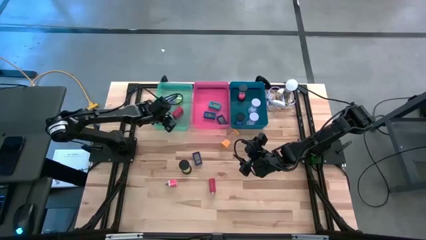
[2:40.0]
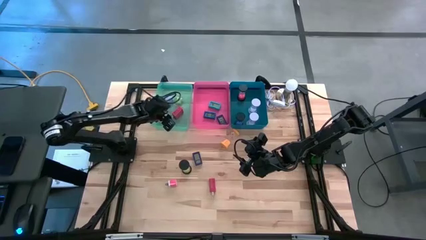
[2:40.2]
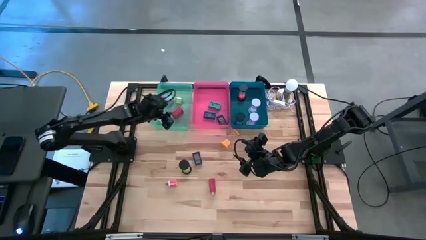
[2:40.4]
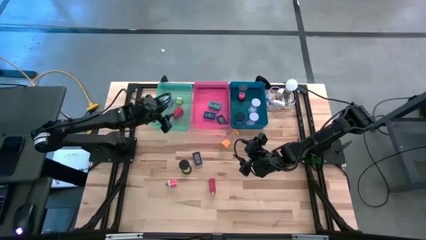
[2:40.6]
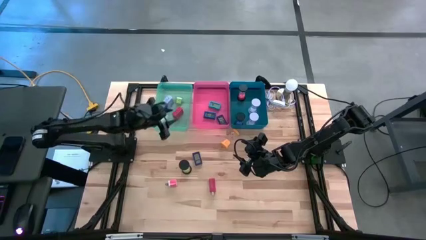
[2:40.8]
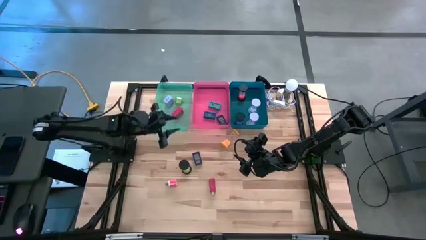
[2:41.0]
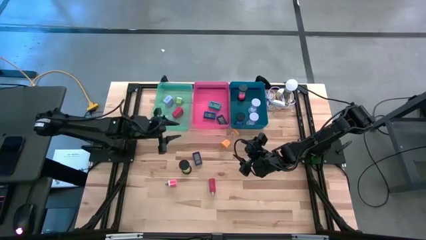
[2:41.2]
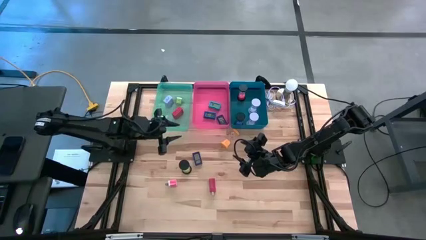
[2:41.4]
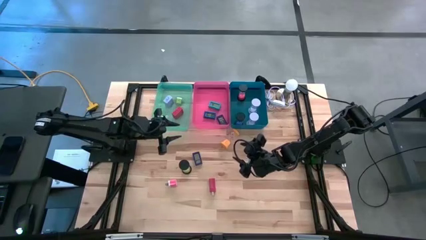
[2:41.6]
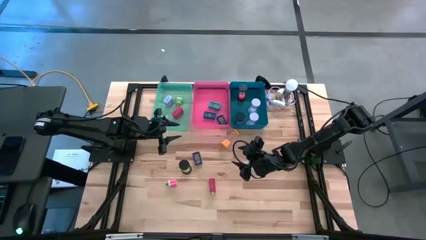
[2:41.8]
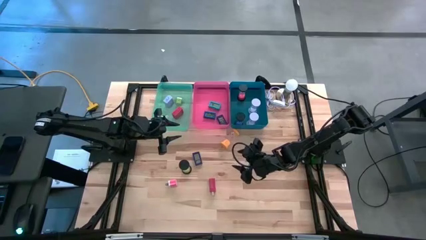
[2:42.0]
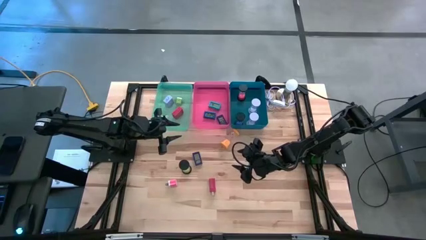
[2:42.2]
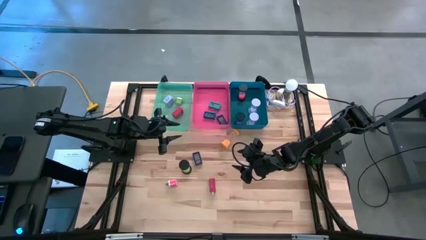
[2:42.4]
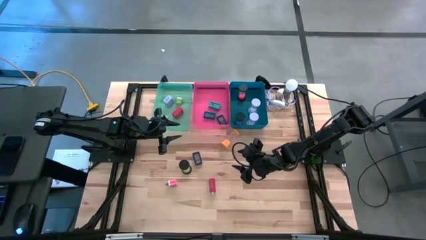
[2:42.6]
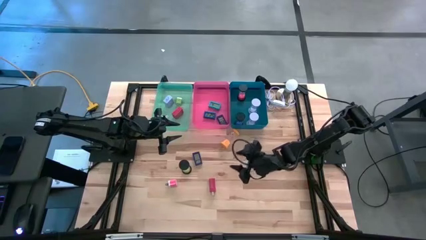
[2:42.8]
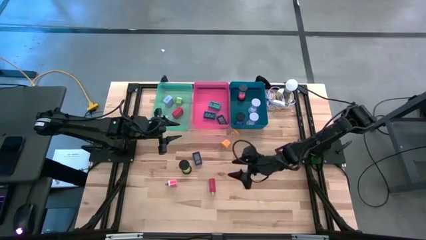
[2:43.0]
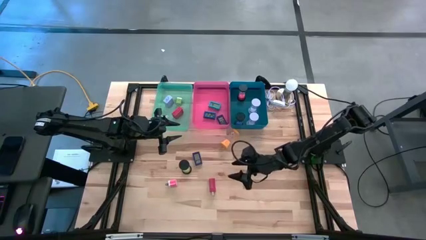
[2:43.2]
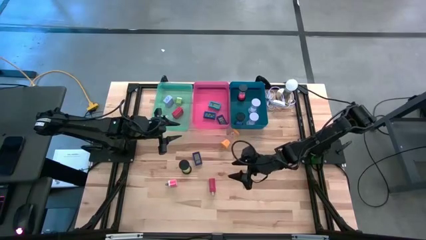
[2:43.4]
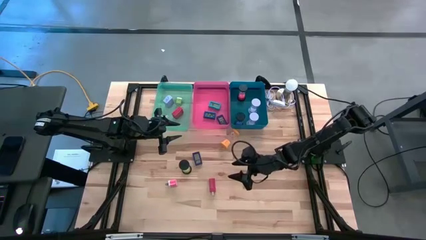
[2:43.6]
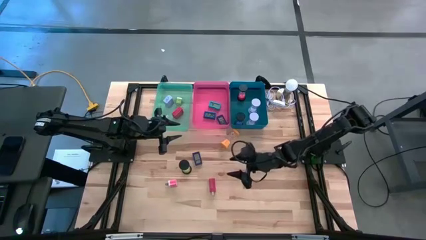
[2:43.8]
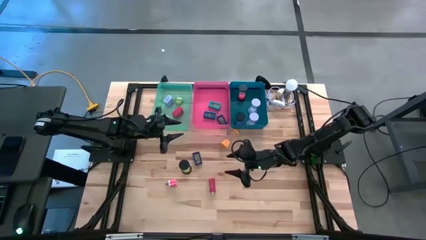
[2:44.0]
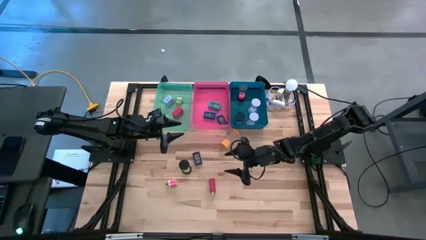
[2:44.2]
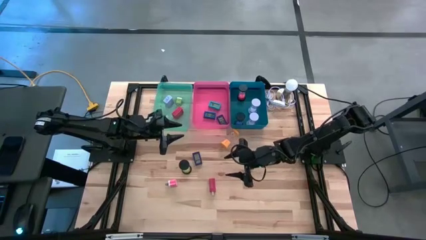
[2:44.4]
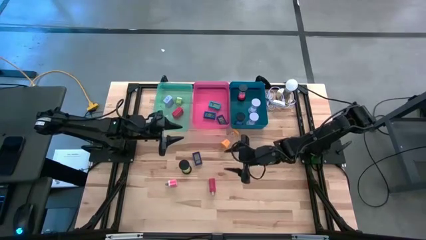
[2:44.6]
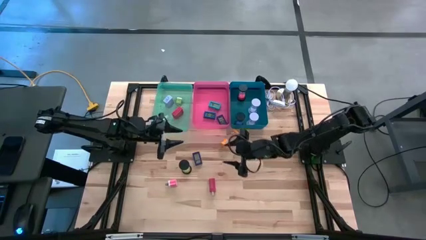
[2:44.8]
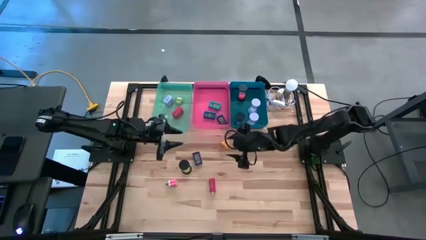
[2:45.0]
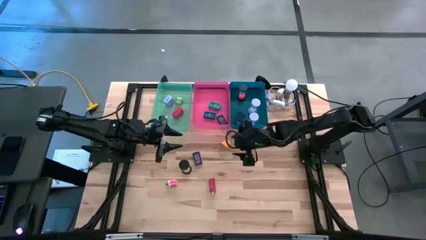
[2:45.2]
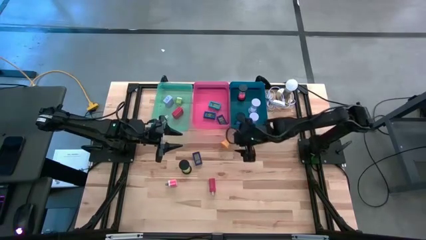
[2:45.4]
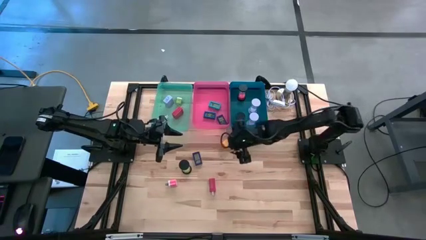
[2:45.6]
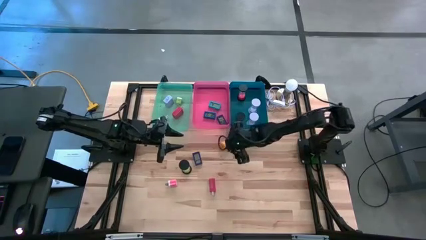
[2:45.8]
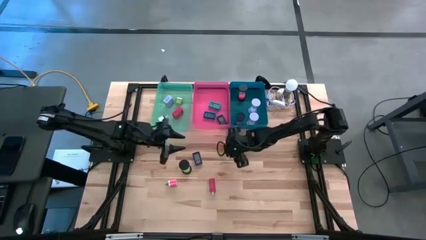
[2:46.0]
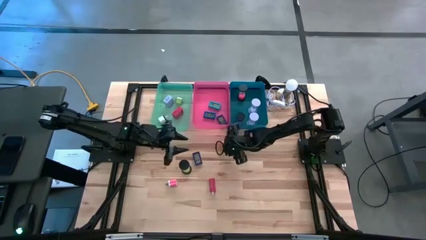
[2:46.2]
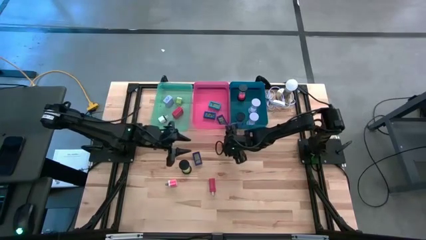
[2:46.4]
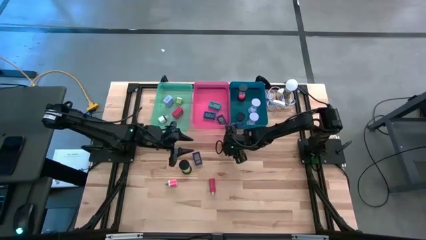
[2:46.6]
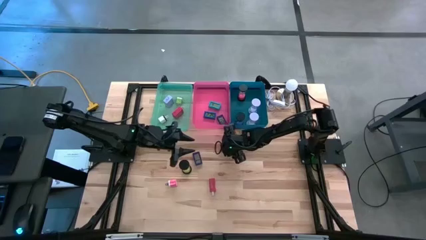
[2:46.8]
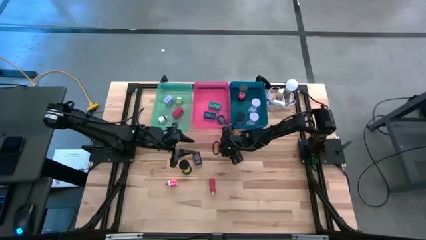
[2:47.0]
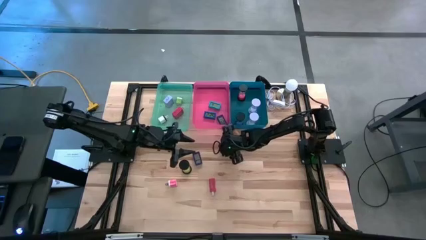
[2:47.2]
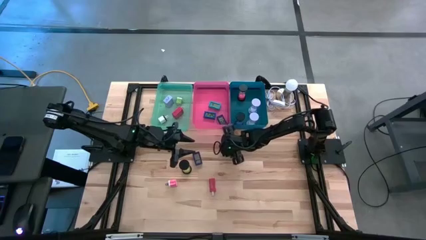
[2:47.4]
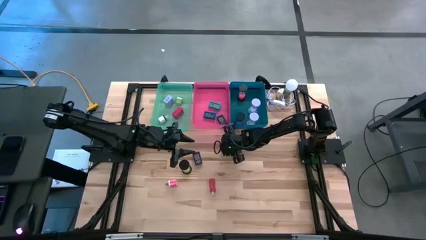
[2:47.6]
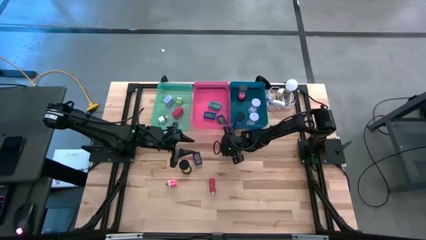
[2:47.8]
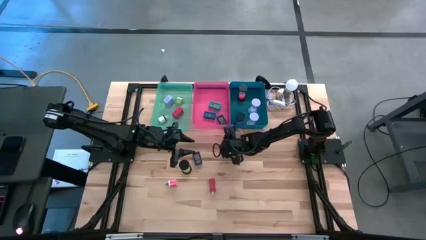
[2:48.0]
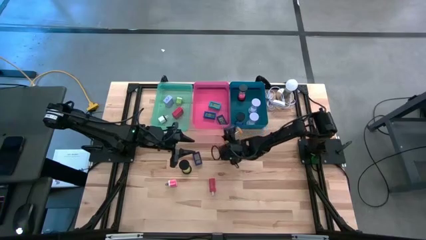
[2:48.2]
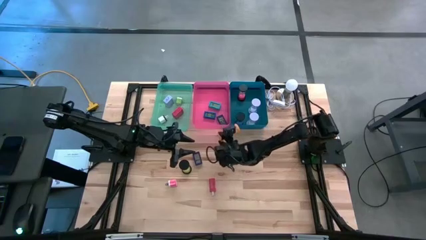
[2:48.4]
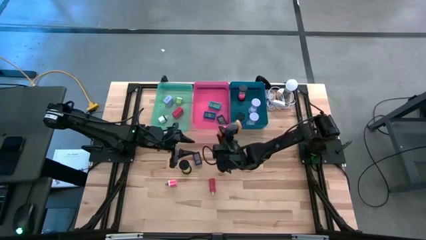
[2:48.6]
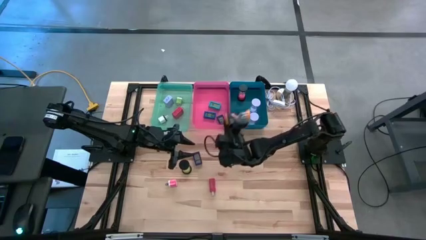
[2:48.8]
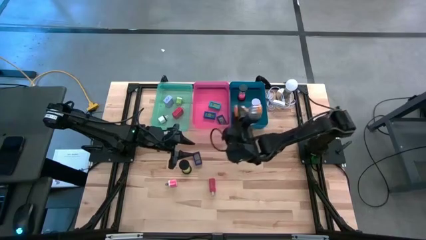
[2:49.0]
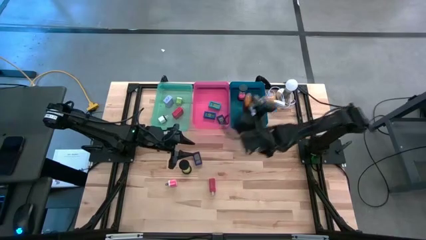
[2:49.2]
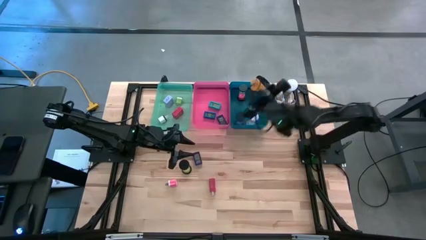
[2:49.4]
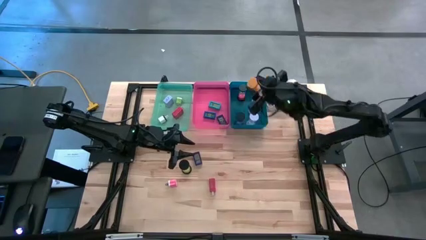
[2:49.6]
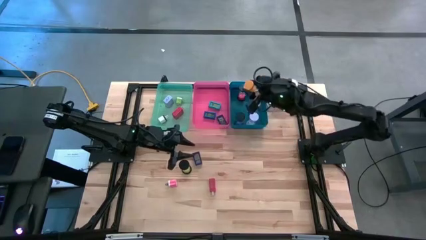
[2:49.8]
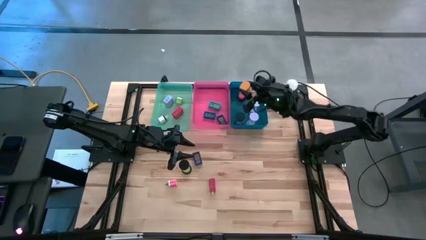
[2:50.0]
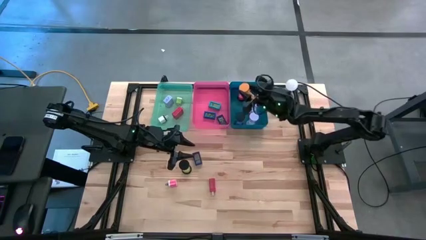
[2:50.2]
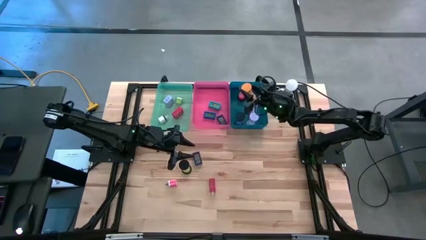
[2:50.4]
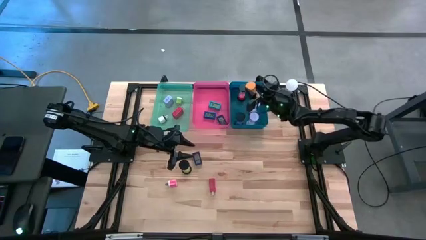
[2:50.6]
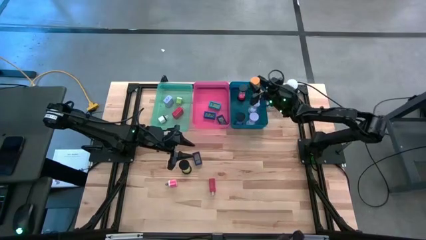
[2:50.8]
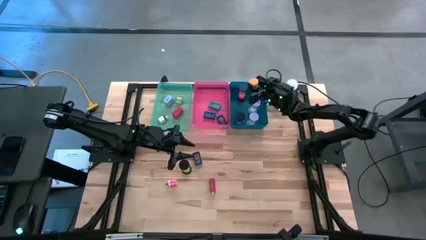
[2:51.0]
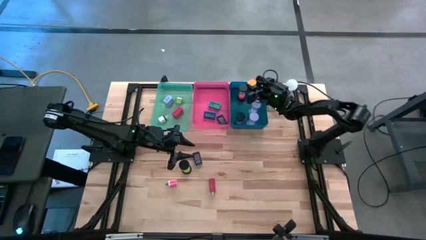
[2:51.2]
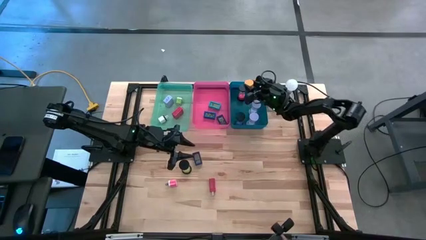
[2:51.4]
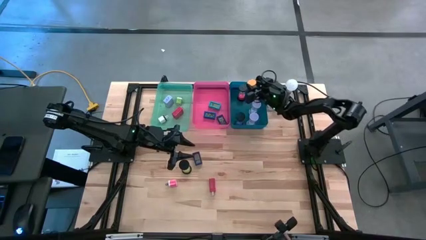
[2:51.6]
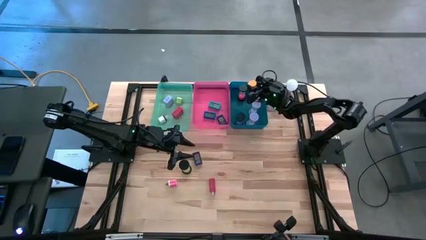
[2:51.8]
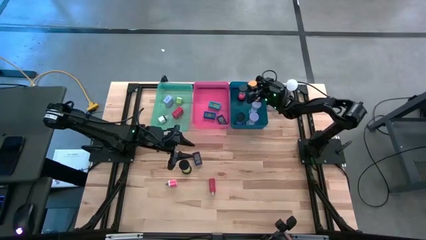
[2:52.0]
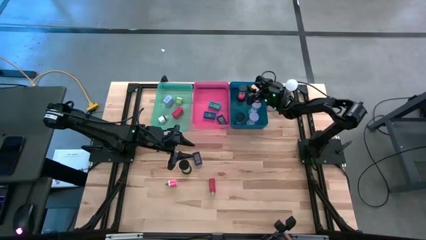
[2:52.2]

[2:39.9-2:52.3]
Task: Pick & Place Office items
Put the yellow hourglass into the blue bin

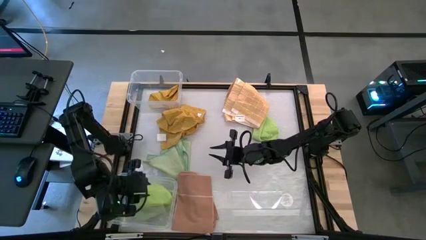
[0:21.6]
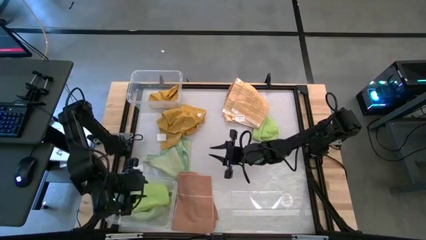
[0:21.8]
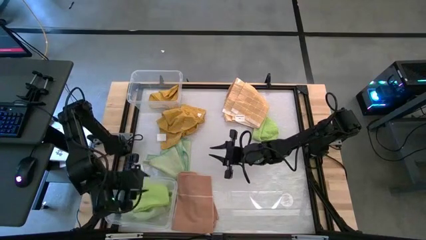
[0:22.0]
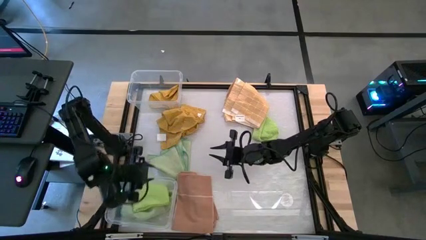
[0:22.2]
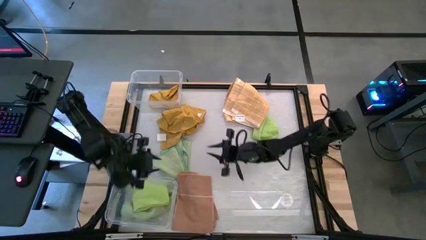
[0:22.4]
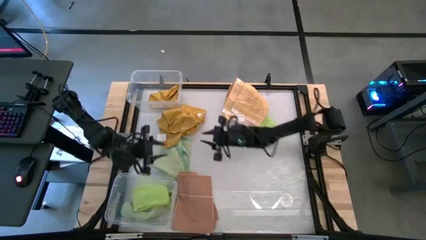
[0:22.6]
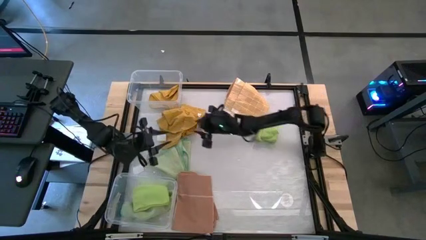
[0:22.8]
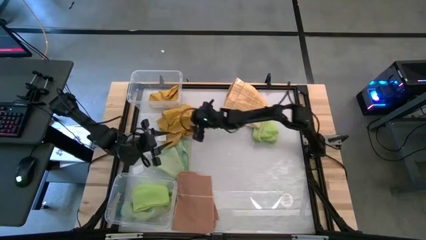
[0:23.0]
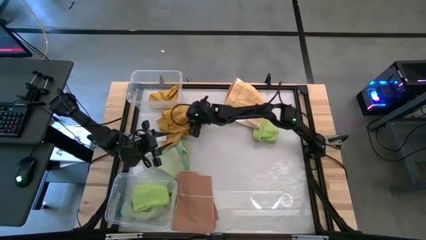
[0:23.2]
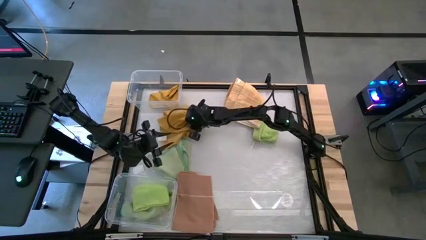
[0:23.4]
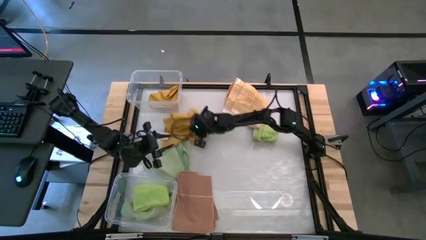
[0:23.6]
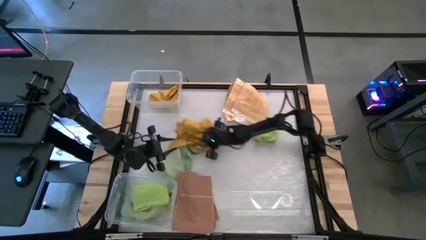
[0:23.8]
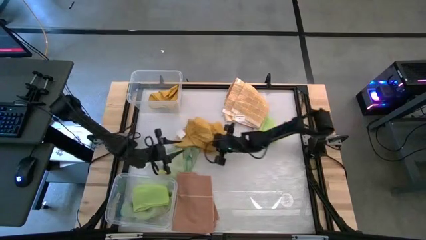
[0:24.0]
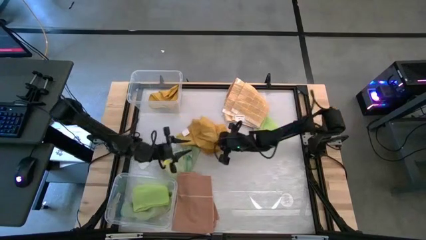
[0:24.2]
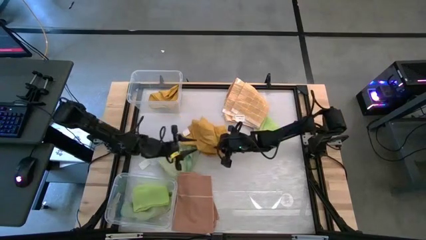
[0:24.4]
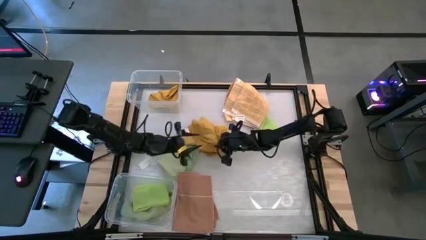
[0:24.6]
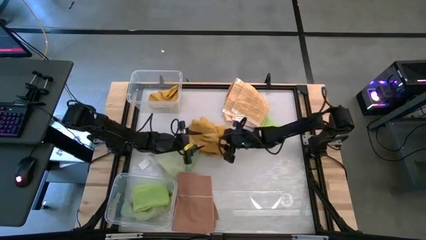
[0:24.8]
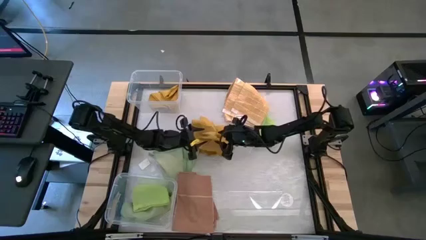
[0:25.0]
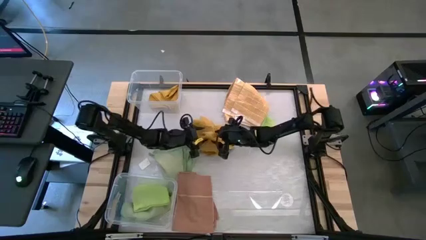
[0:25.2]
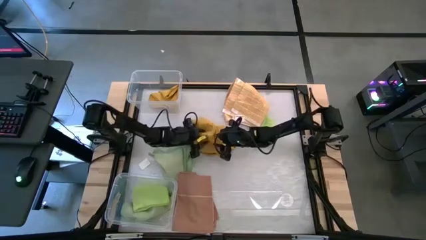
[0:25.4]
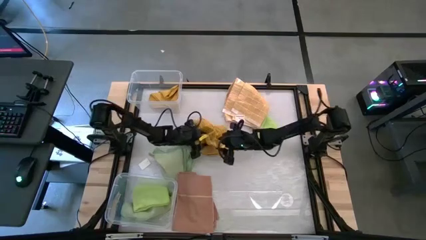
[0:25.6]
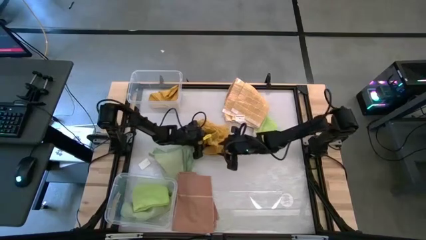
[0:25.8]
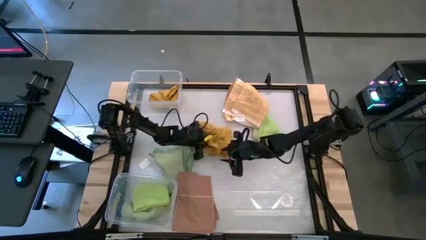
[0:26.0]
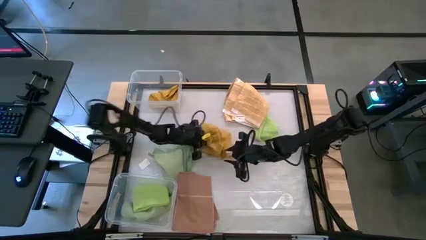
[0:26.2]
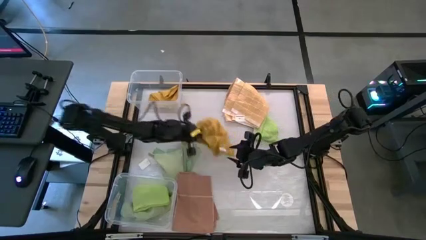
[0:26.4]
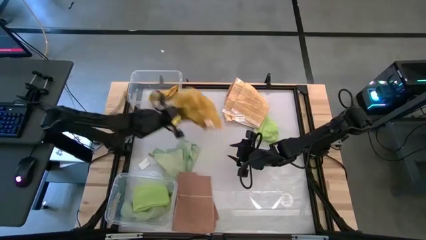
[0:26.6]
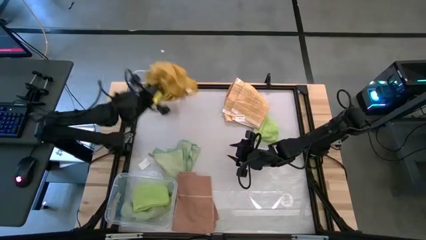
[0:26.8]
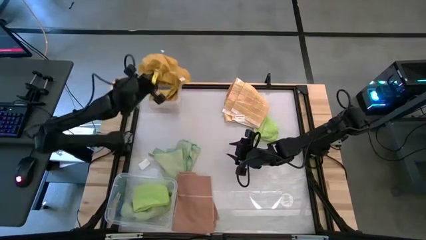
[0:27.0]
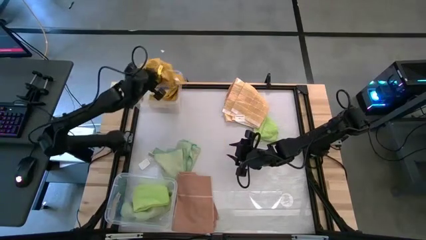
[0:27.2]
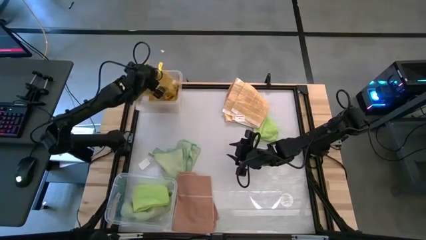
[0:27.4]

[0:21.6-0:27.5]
Task: Sort towels by color in basket
Put the yellow towel into the top transparent bin
